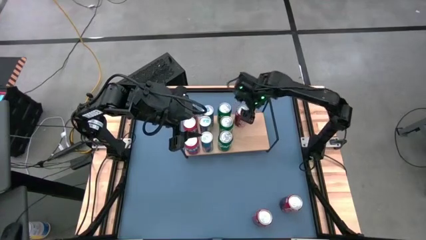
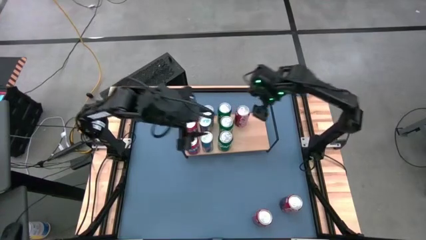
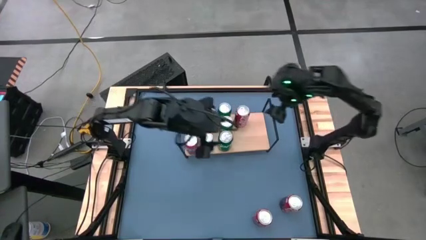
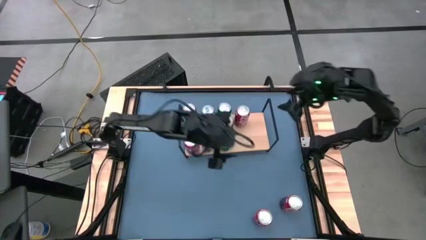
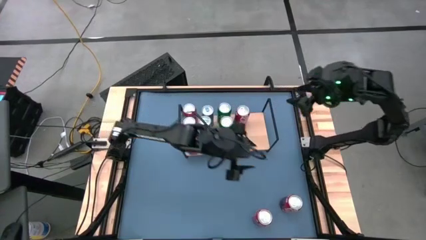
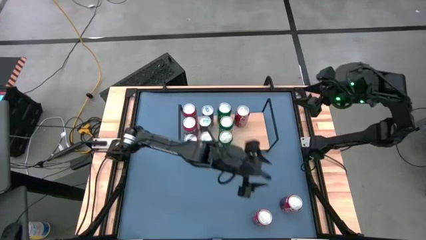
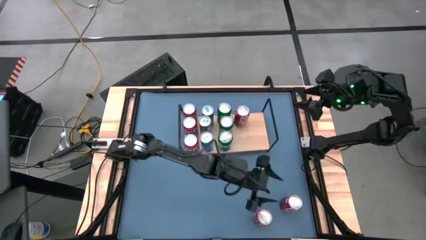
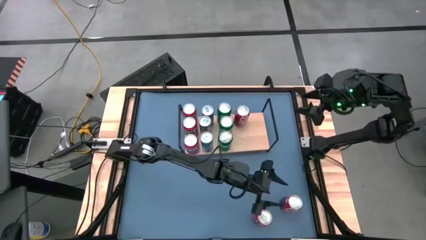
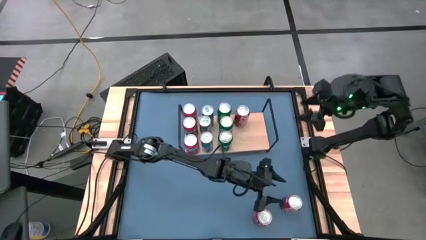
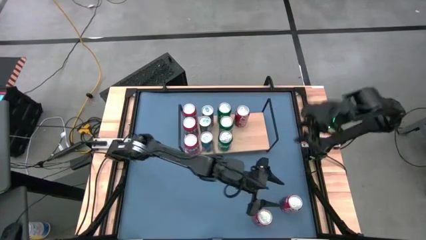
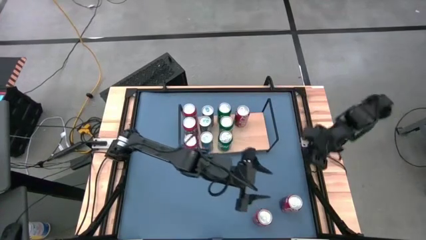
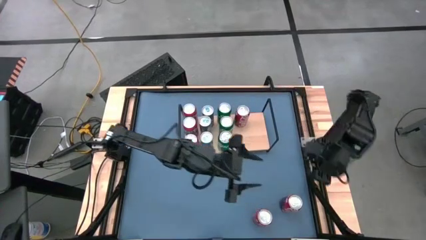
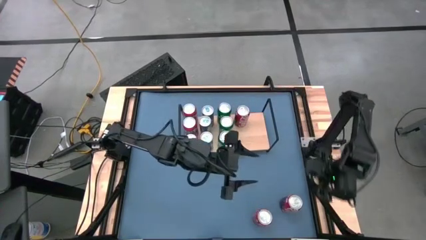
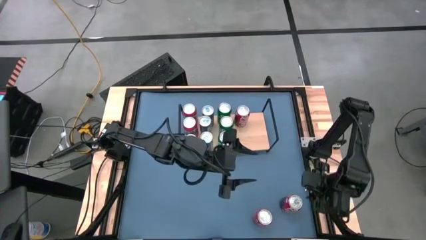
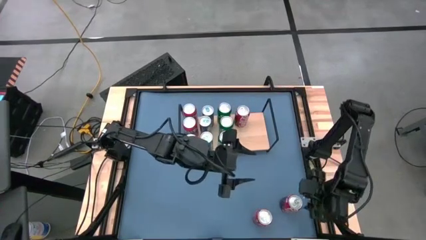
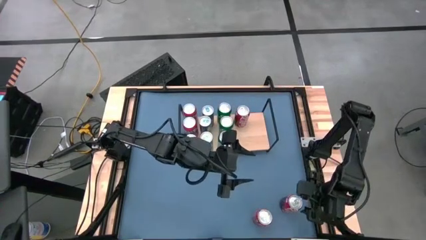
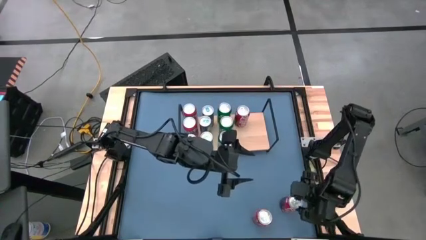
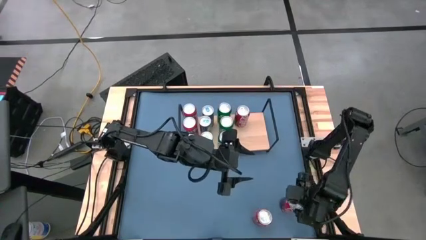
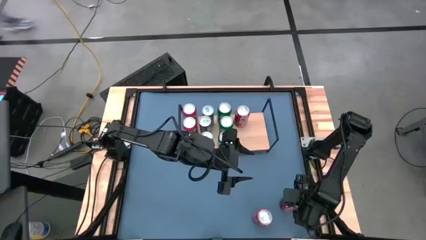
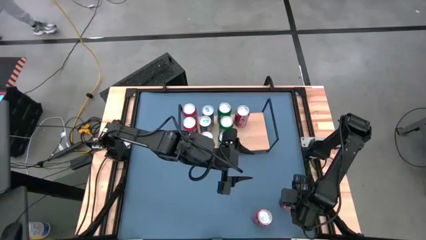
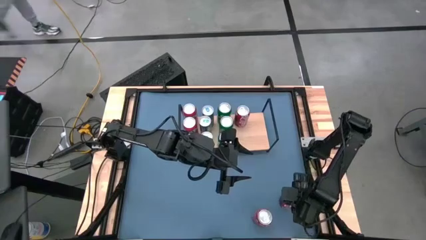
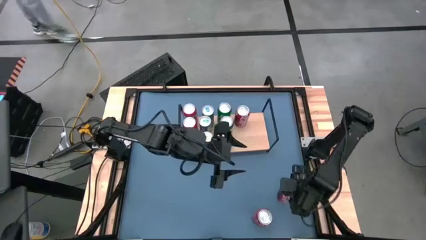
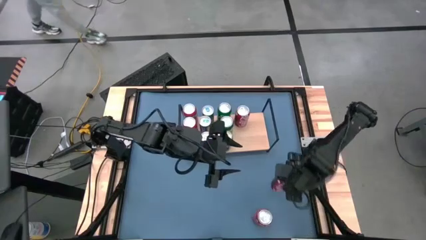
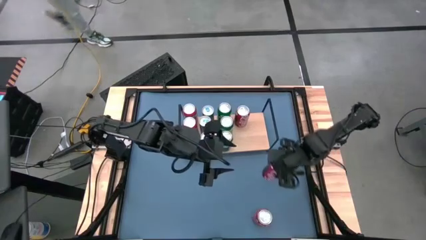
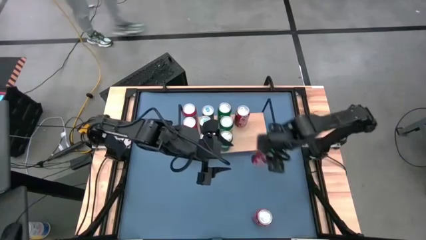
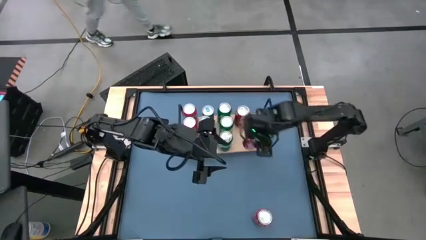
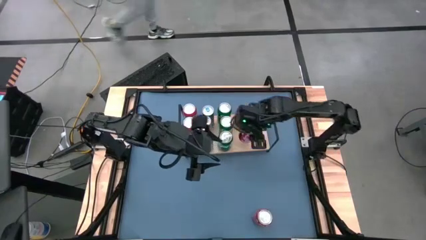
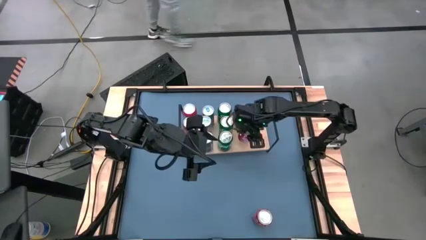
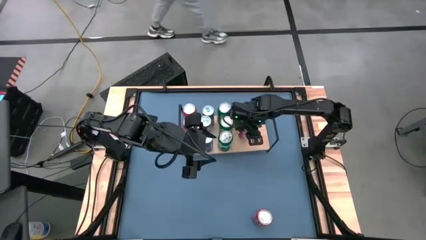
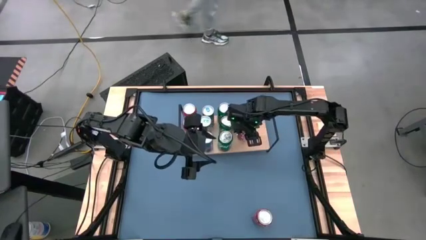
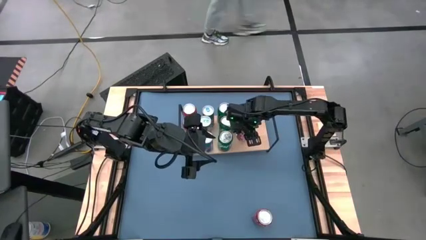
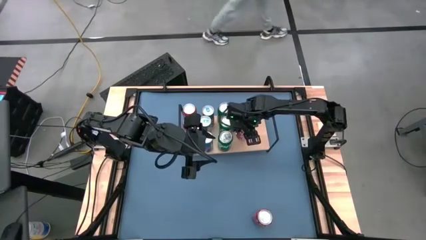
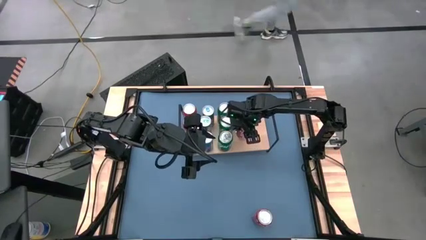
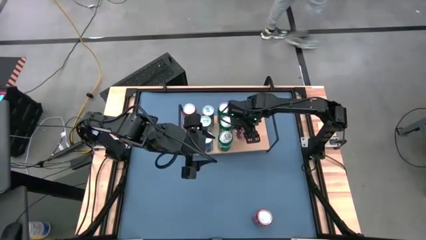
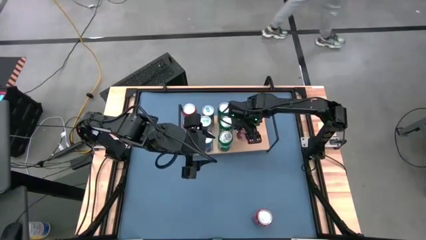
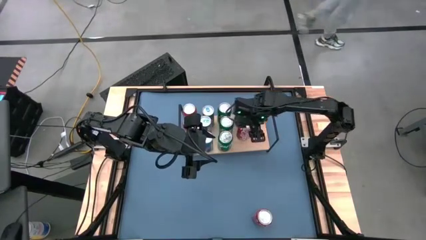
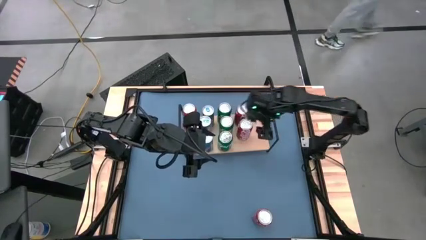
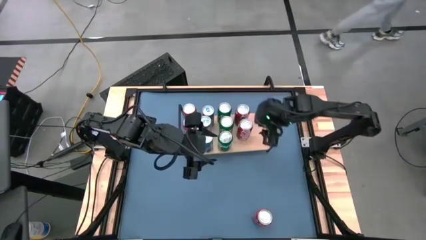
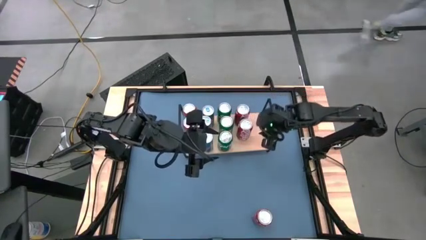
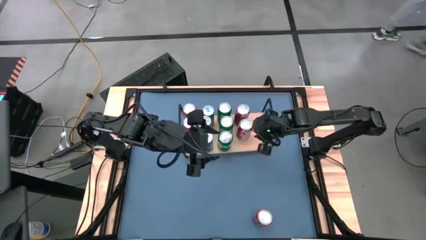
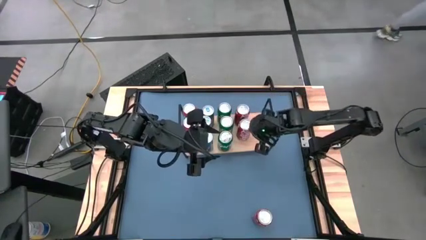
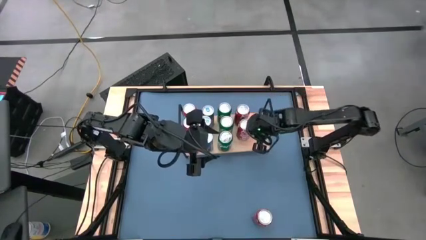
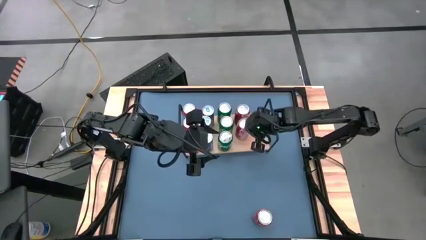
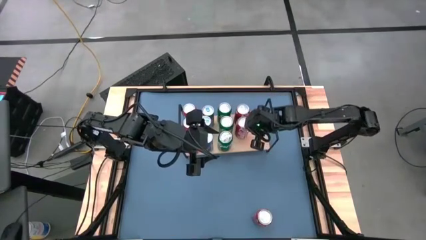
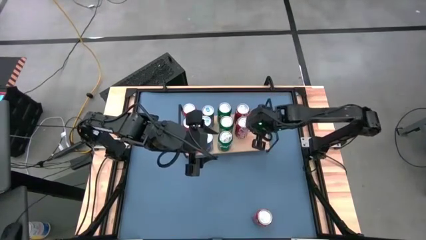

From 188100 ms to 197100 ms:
Task: Place canned beverage on shelf
Put the red soda can on the shelf aligned with other red soda can

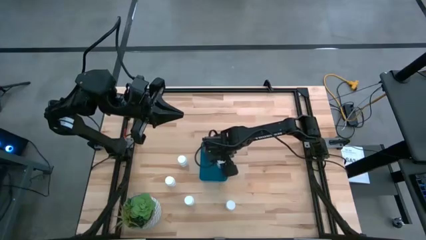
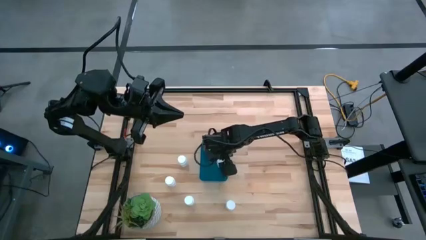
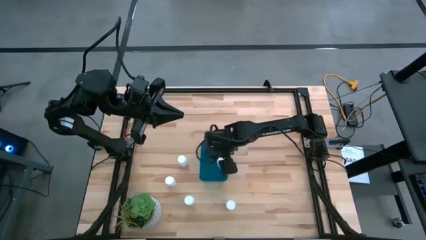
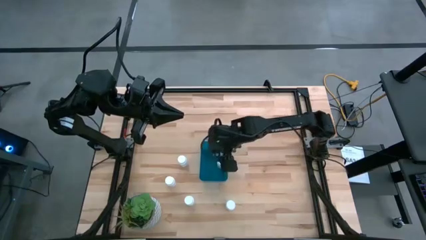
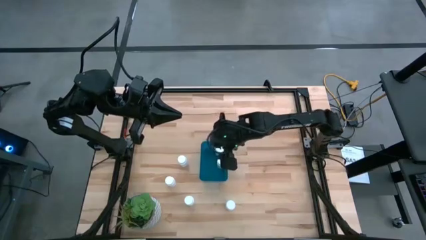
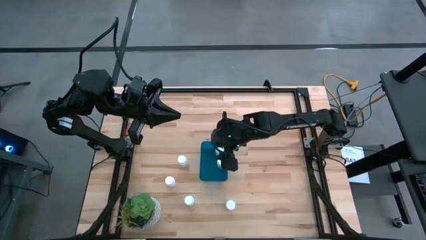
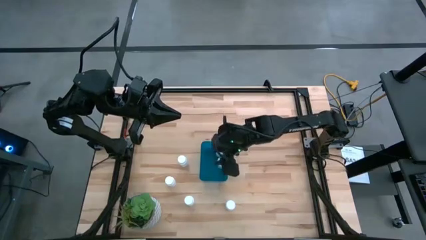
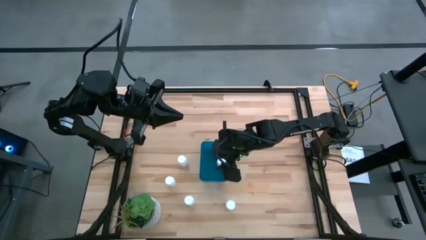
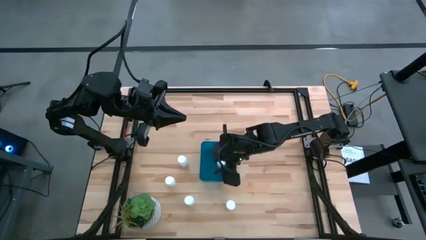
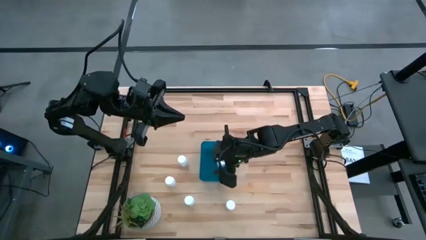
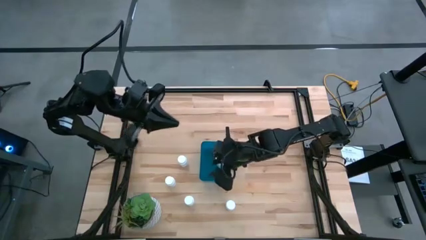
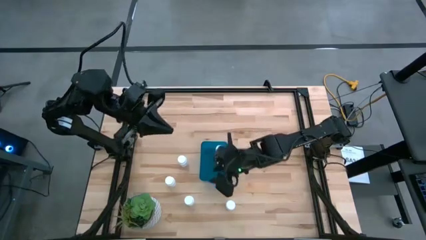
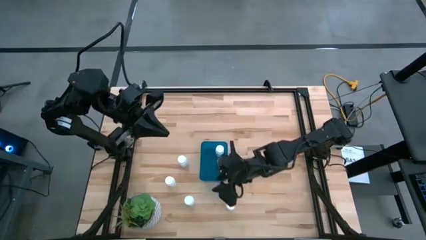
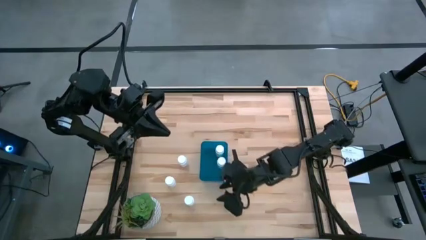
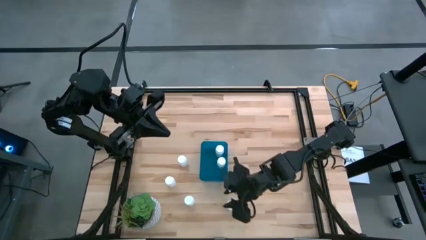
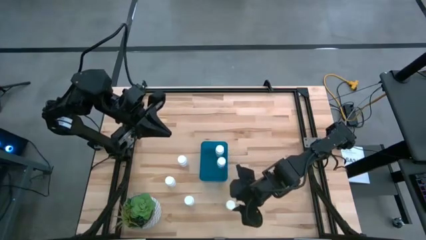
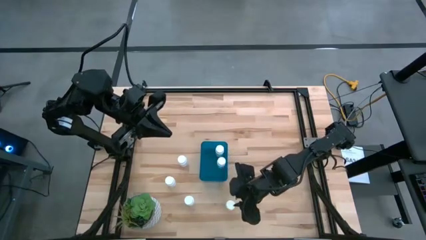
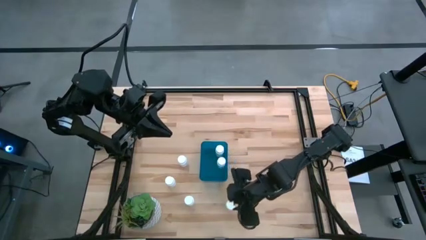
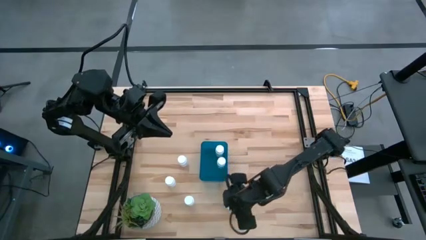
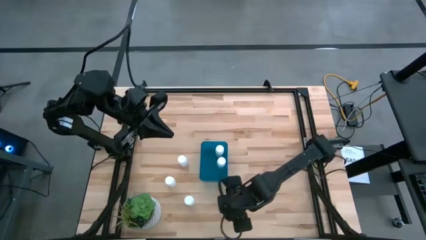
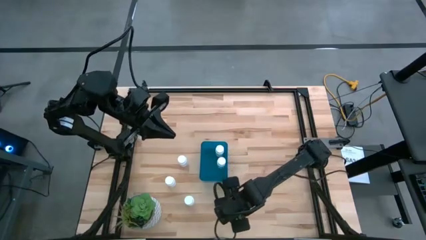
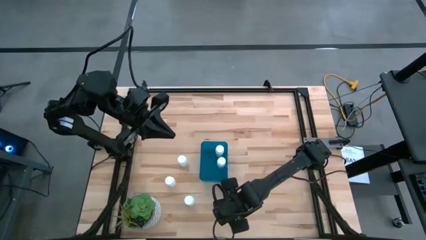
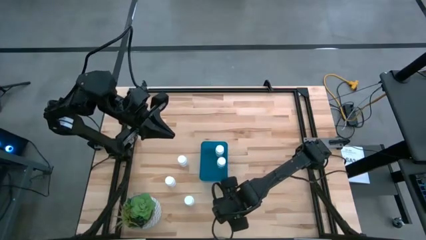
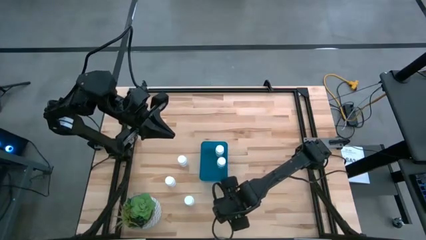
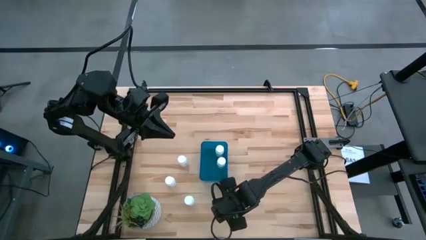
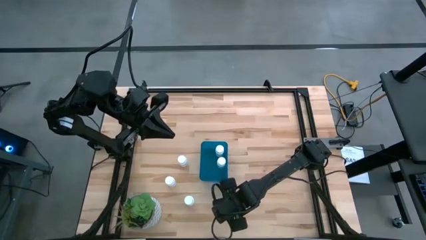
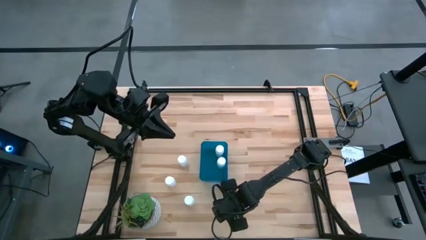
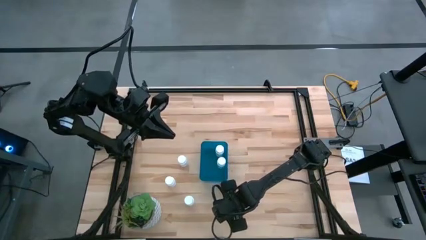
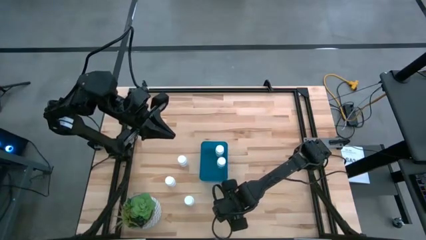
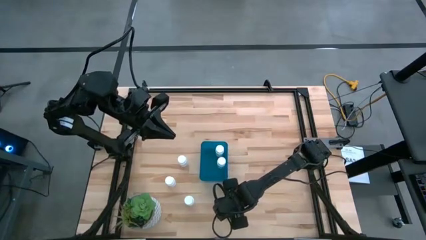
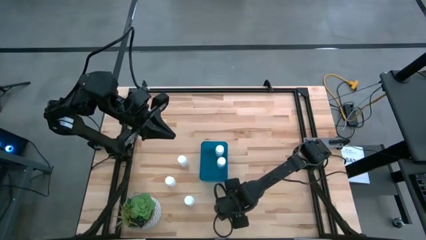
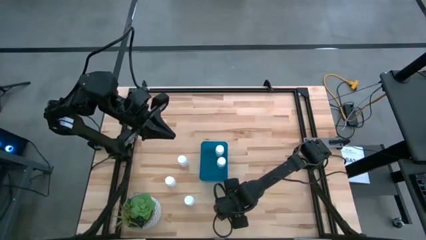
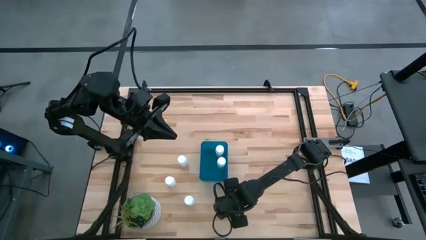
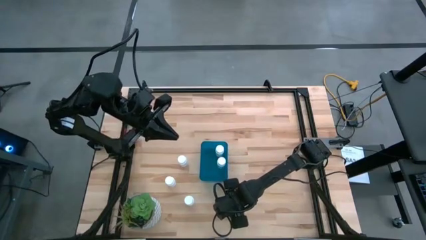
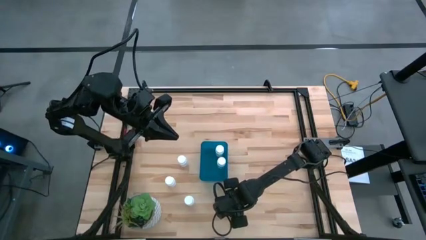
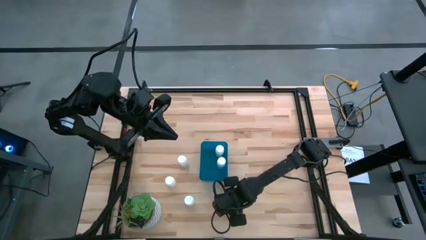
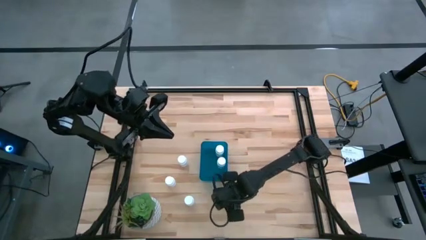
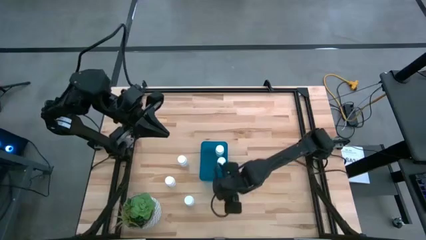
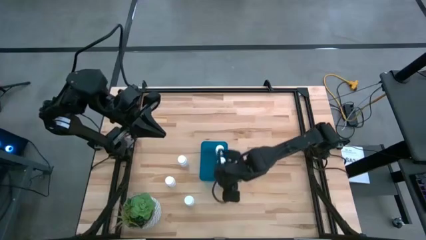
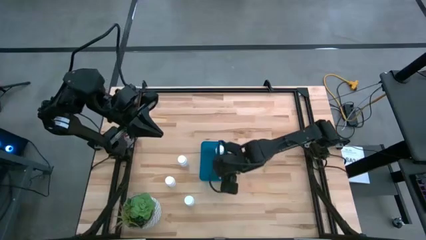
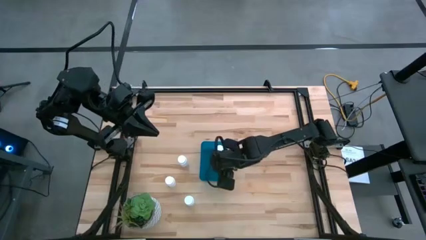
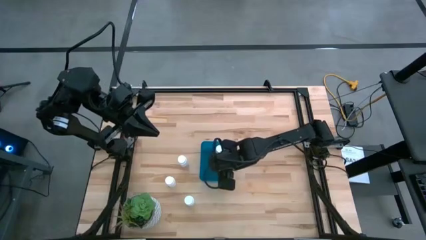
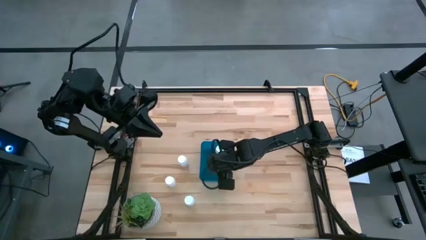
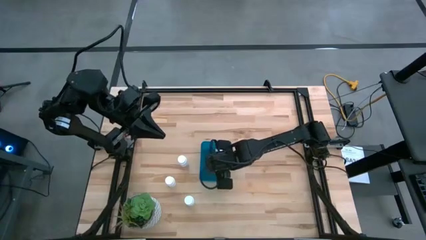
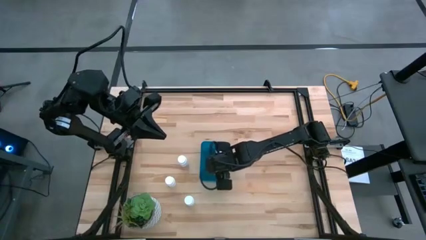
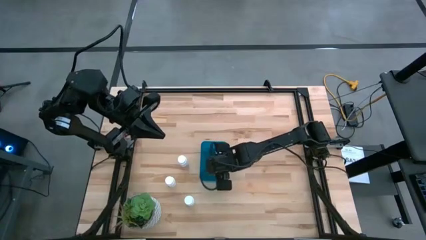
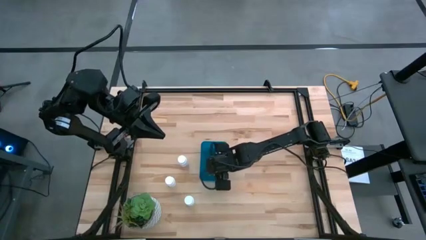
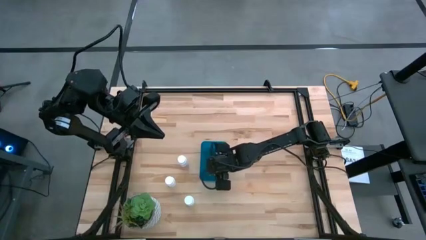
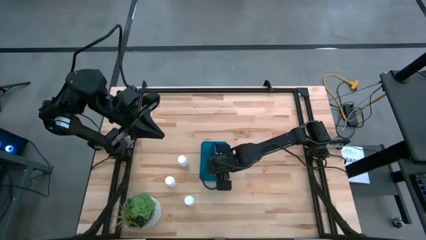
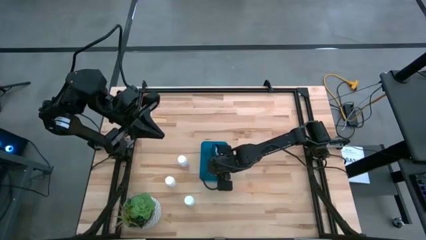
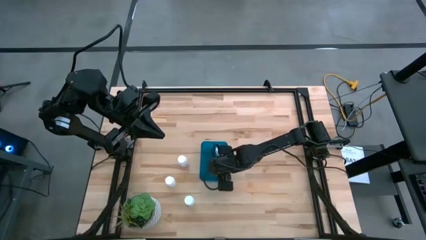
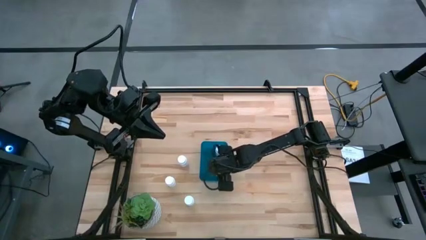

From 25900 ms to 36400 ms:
Task: Pick and place pill bottles into a basket
Put the pill bottle into the bin
